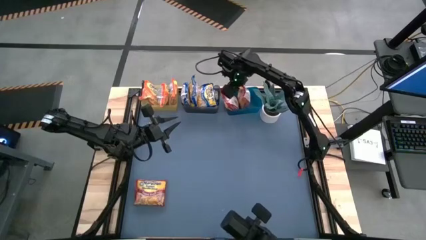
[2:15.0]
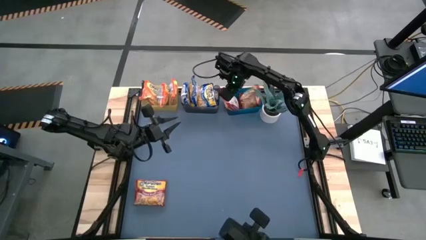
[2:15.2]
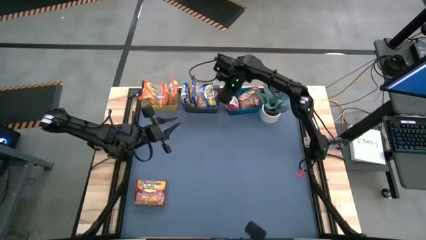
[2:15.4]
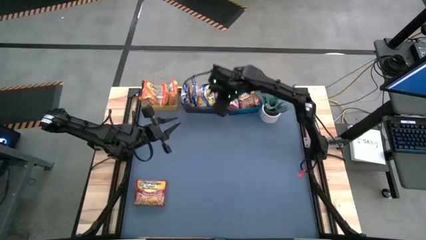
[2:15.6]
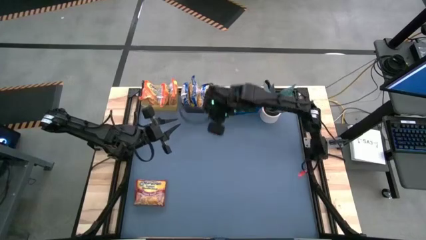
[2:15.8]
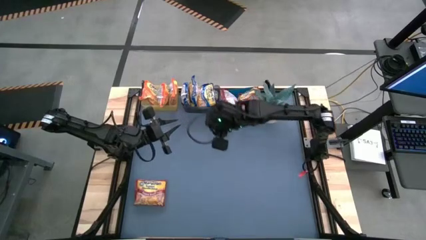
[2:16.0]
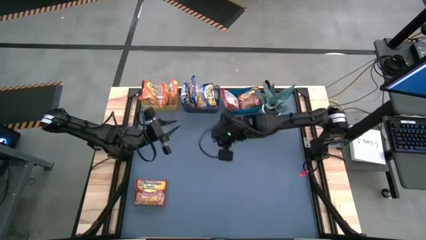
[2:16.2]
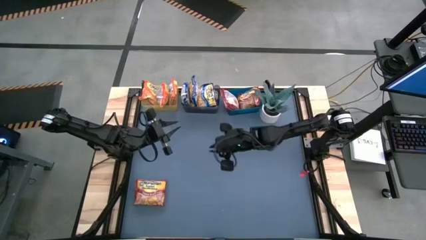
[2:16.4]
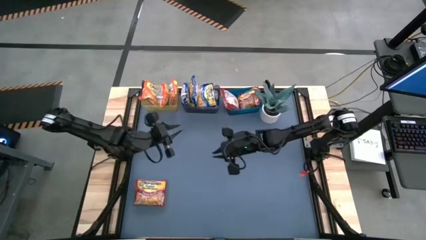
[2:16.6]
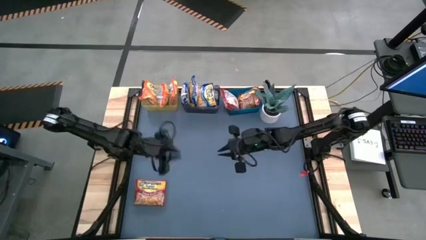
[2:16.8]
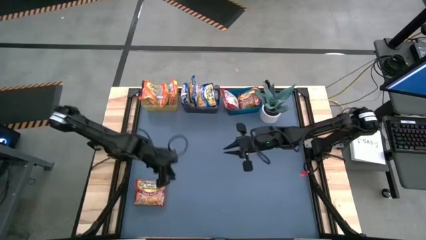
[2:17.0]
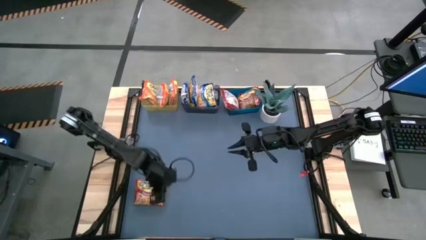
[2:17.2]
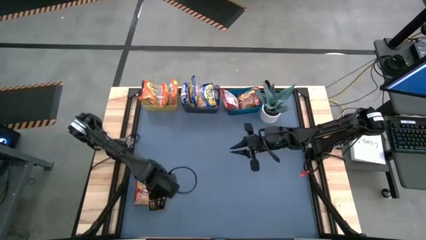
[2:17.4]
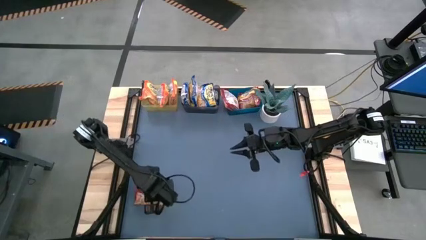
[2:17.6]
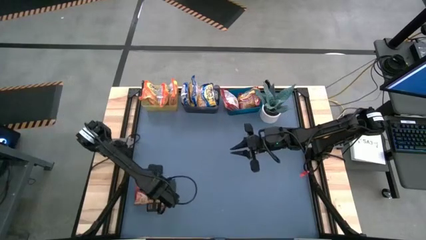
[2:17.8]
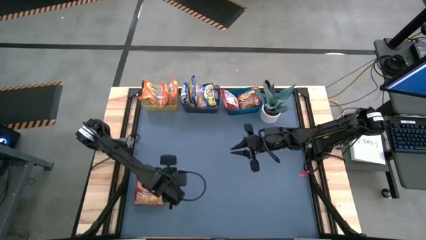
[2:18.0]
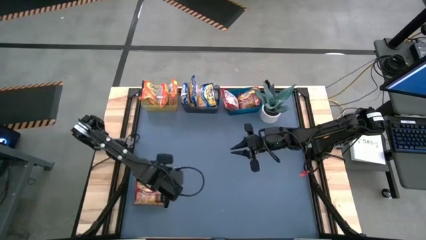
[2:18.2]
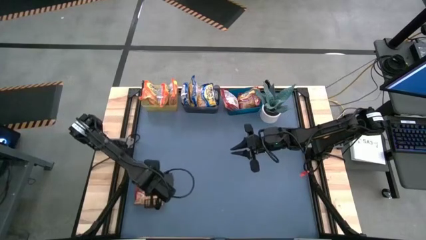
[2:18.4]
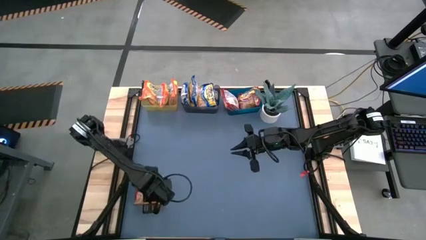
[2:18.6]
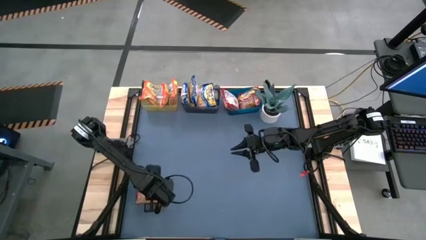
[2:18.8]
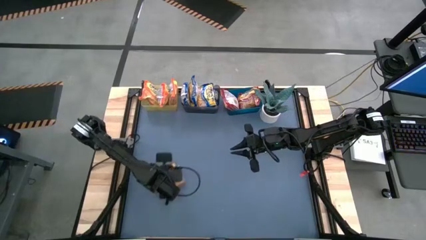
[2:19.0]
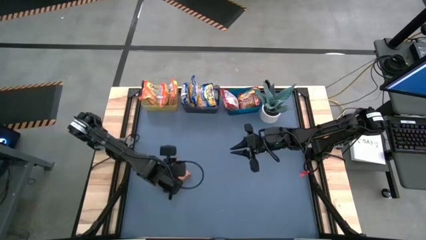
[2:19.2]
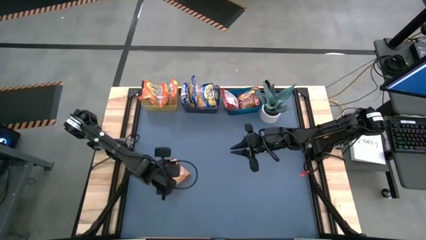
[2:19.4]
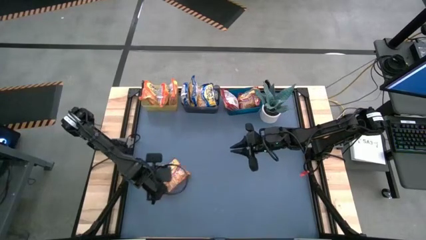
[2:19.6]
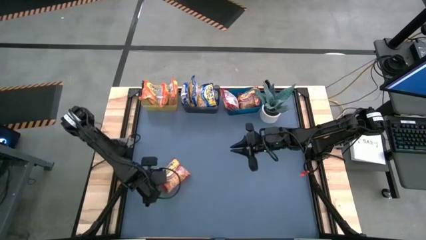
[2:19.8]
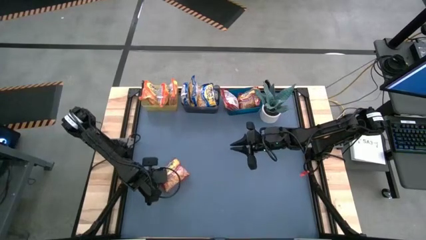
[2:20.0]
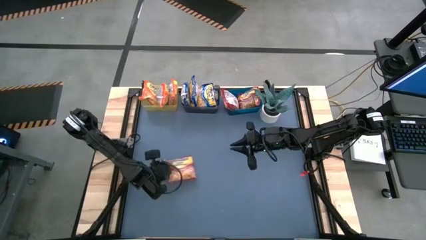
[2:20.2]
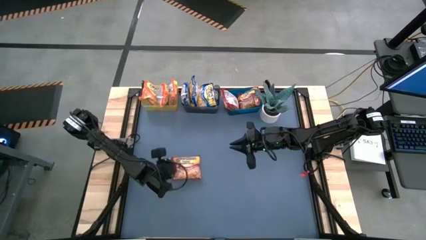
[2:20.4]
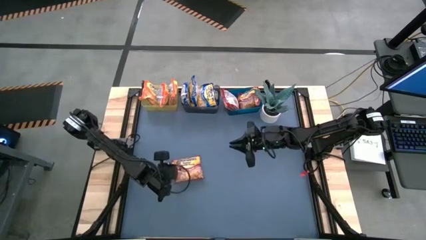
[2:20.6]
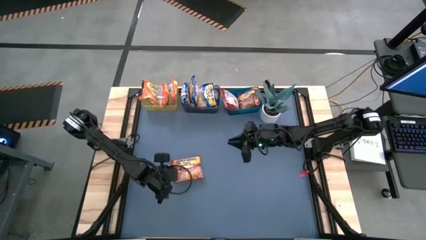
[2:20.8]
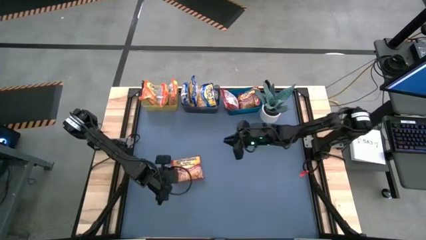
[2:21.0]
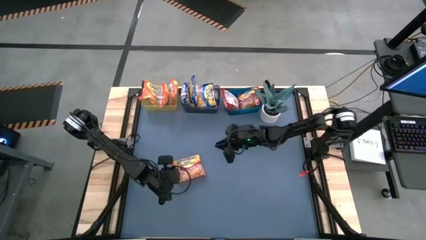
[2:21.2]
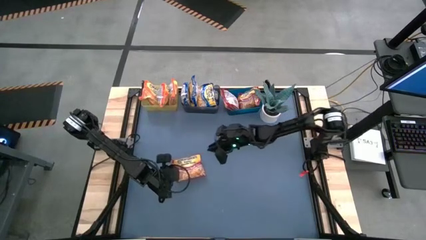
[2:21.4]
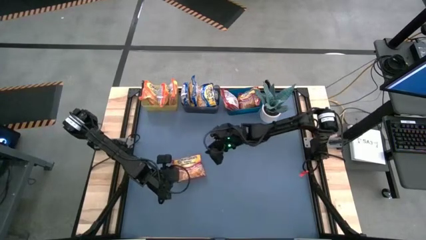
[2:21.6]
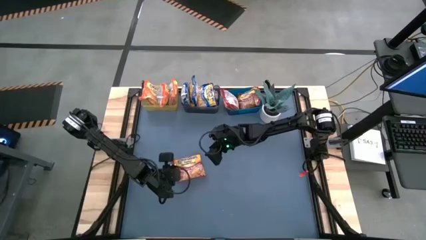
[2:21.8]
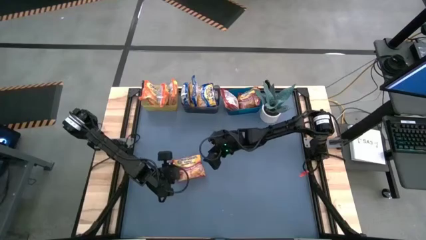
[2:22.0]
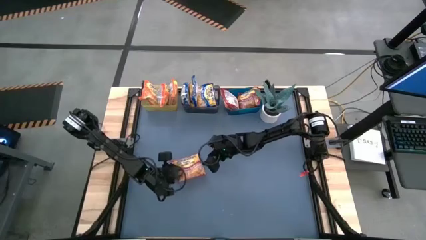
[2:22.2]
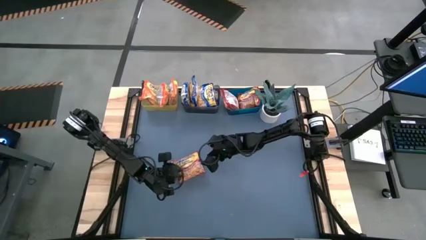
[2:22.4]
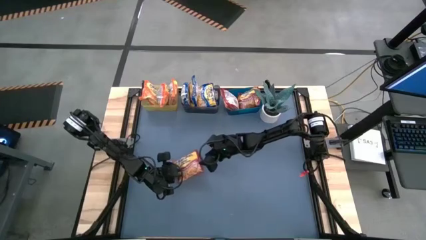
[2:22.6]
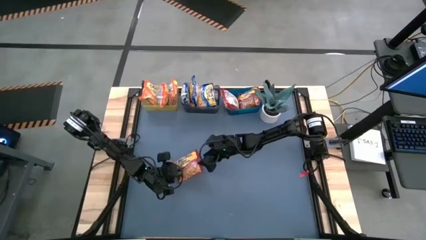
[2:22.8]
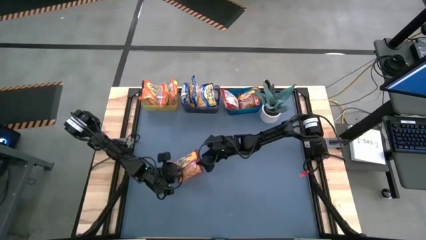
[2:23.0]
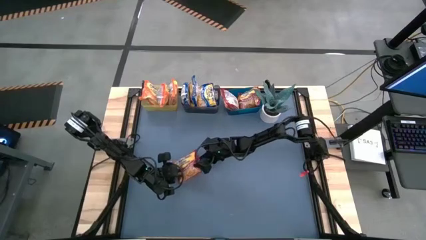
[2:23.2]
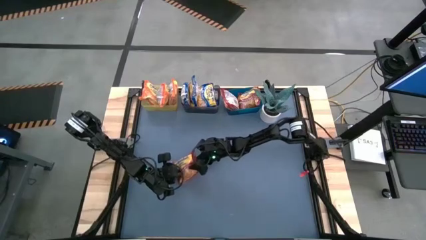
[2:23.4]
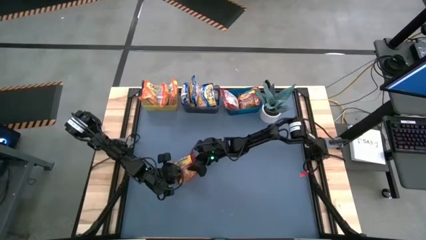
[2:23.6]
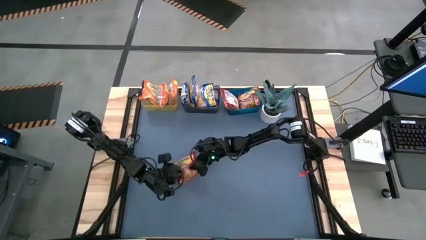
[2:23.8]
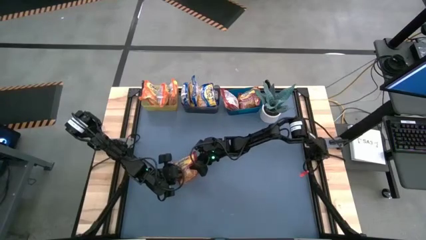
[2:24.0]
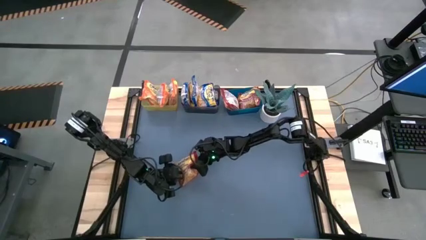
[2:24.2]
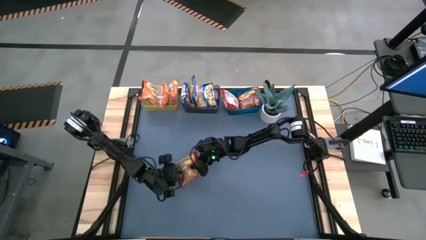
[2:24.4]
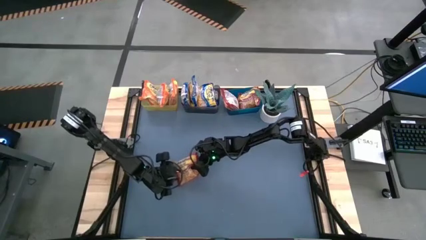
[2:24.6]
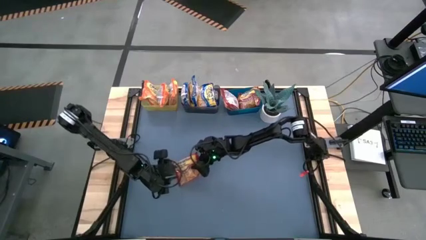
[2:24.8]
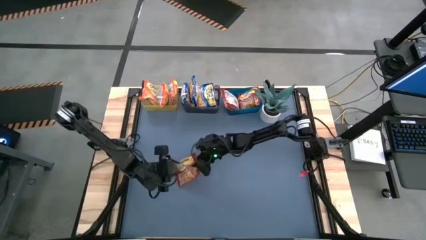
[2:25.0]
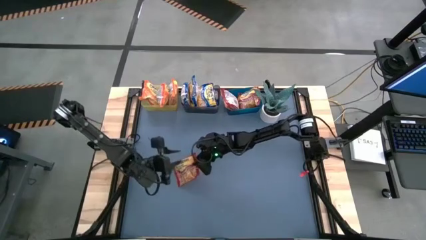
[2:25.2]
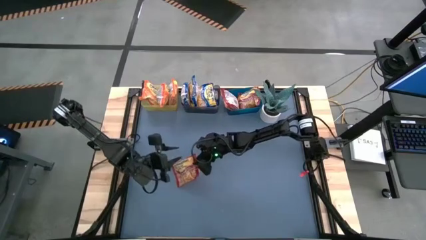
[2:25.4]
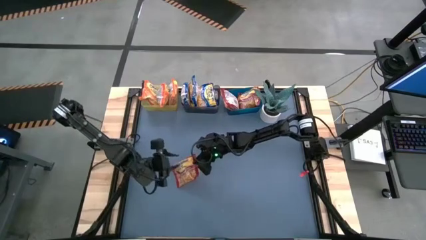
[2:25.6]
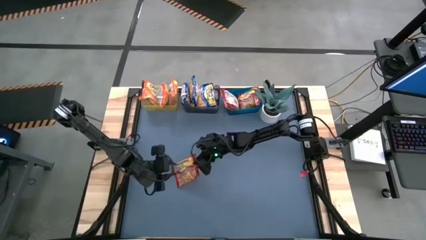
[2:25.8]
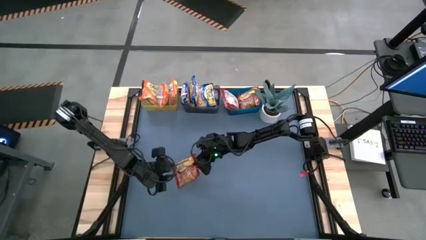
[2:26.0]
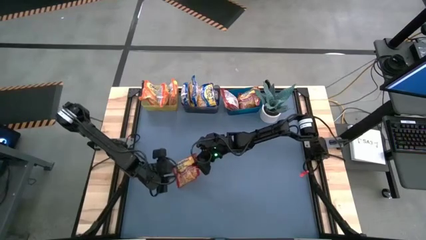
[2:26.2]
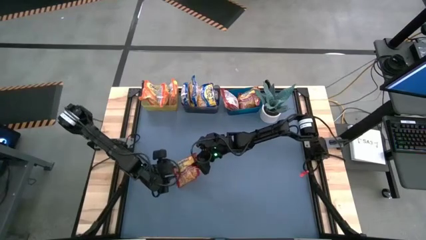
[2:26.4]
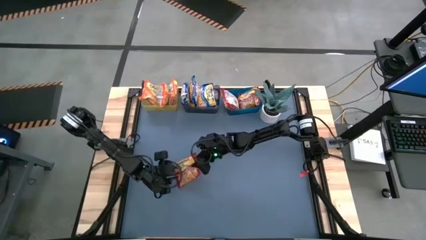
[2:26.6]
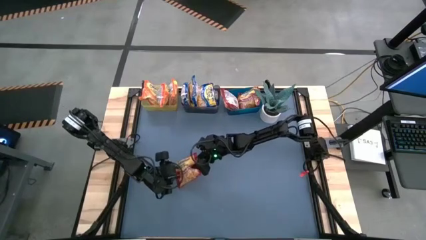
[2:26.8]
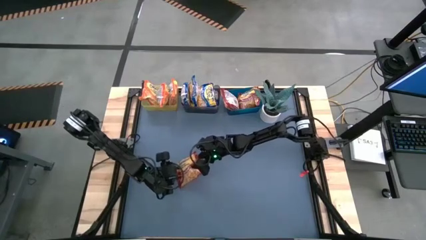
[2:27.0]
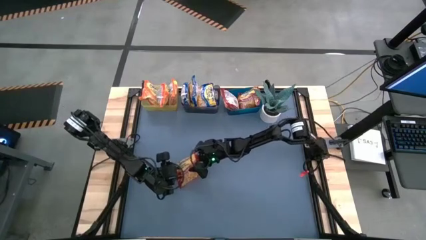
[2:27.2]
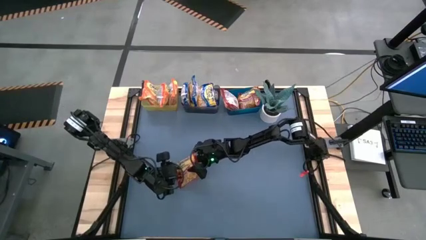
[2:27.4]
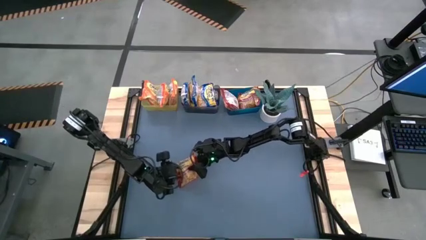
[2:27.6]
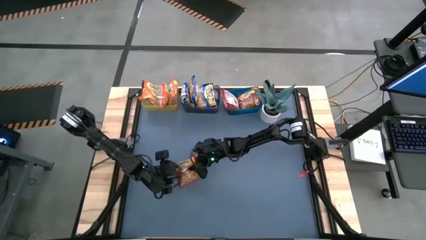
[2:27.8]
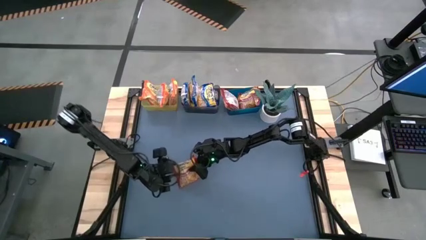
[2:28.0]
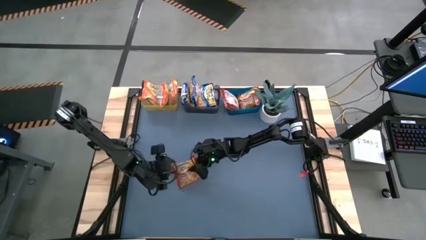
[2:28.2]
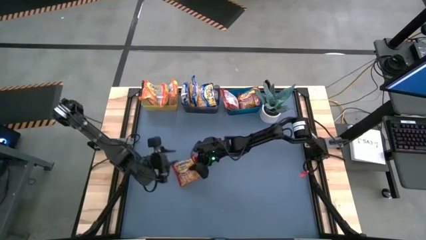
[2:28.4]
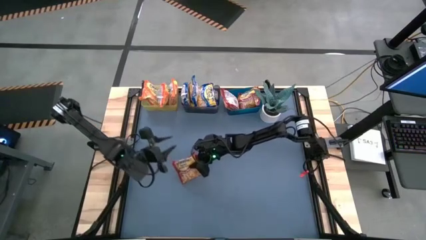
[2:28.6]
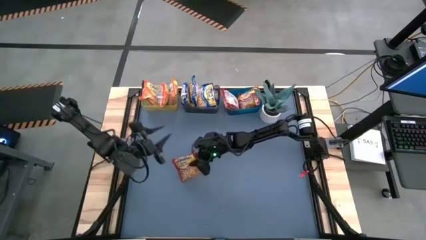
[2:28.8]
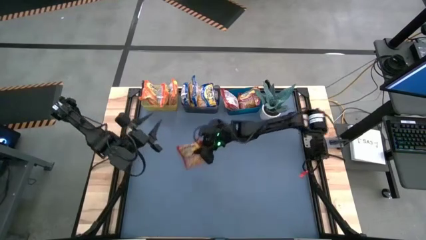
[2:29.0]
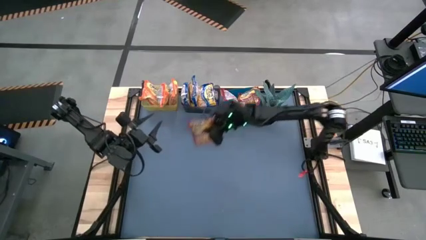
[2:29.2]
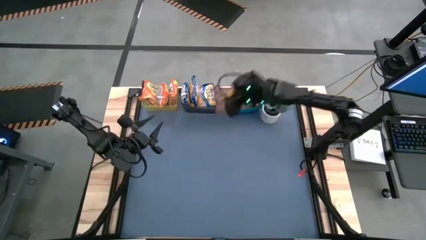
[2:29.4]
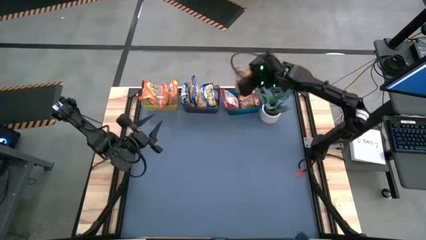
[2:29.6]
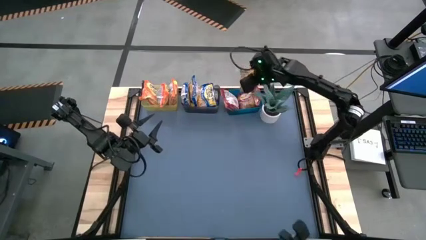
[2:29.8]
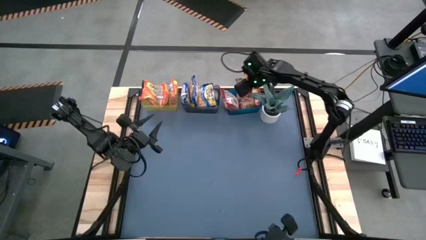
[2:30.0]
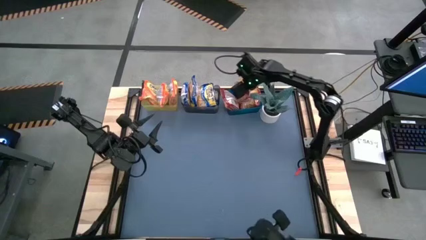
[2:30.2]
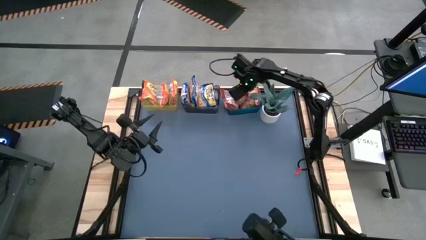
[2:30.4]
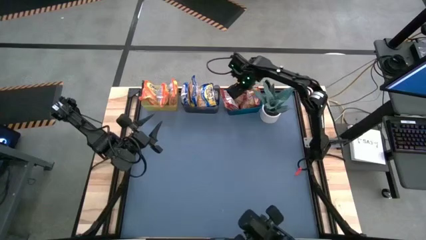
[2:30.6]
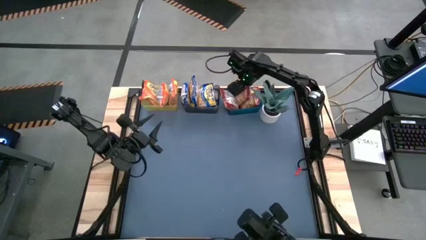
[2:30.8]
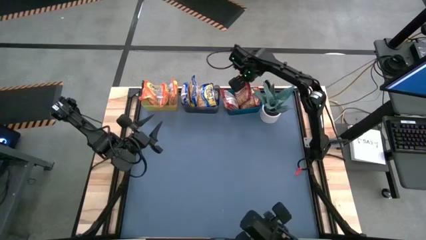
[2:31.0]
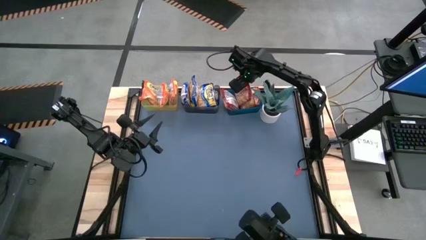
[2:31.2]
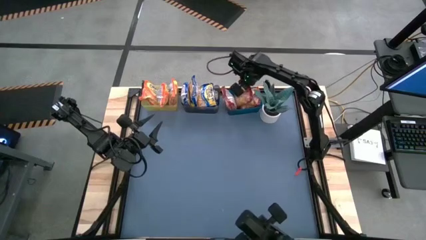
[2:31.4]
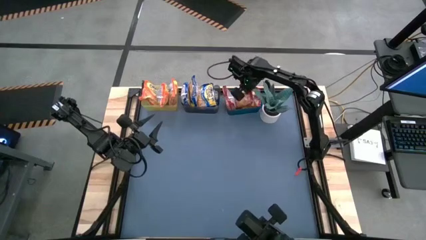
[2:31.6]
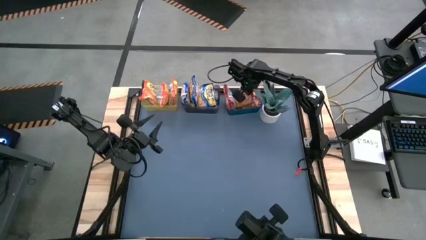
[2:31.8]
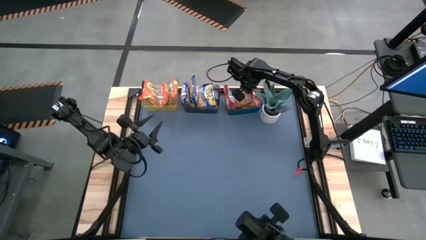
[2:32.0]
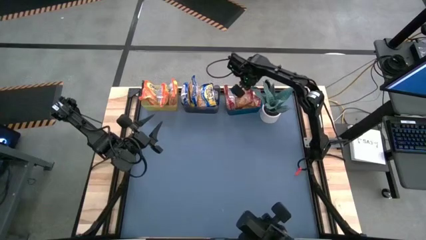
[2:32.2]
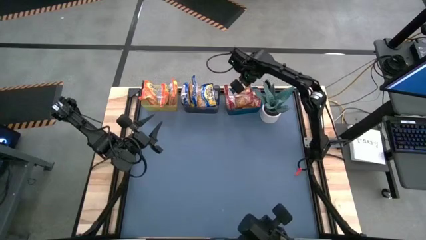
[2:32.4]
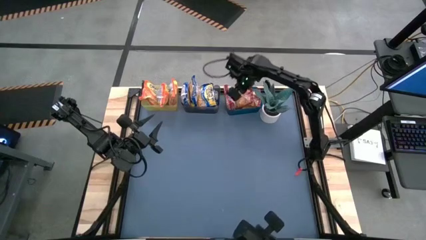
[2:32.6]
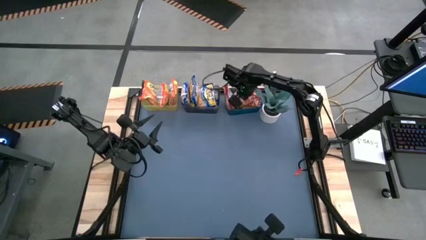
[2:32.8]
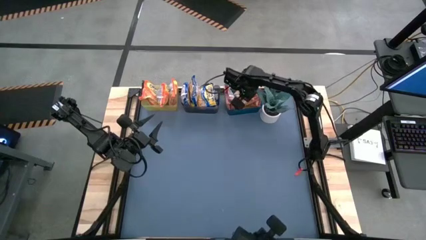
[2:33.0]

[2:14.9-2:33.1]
Task: Sort Maruchan noodles
Put the red noodle pack into the blue bin
